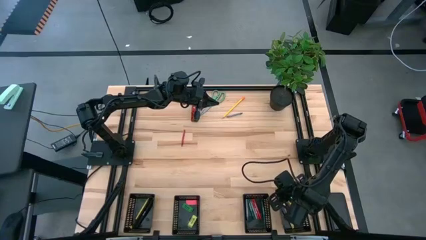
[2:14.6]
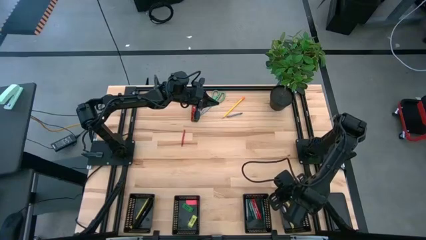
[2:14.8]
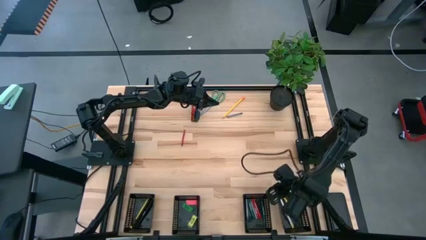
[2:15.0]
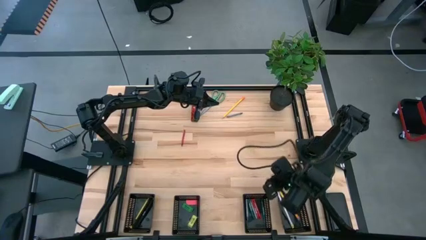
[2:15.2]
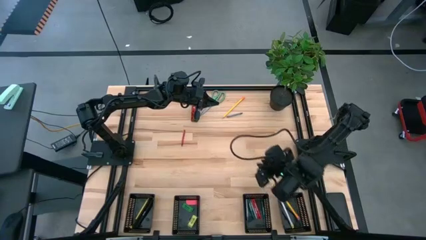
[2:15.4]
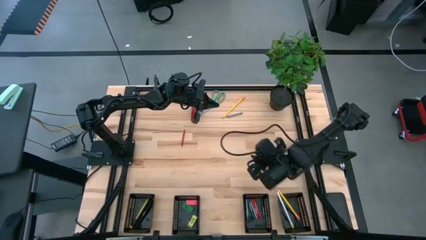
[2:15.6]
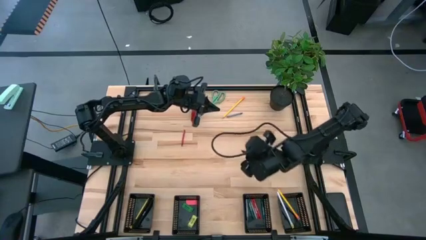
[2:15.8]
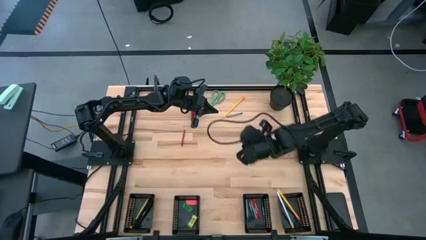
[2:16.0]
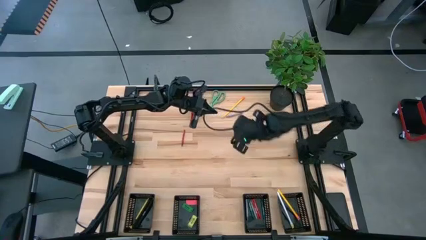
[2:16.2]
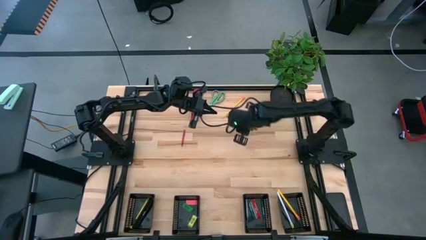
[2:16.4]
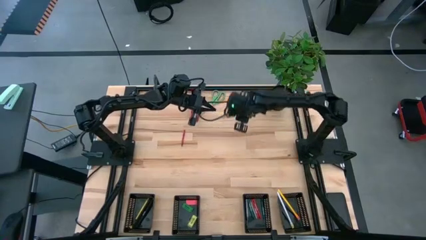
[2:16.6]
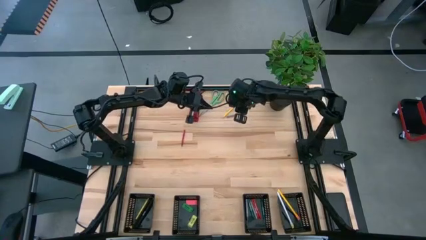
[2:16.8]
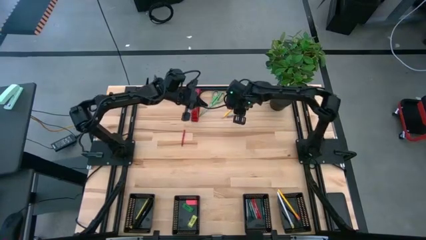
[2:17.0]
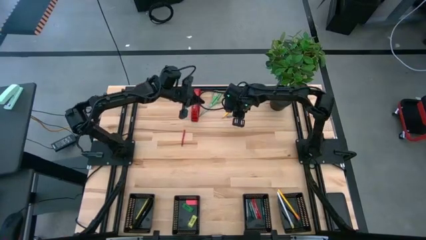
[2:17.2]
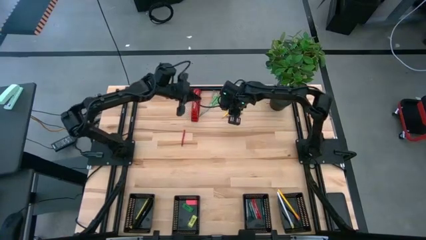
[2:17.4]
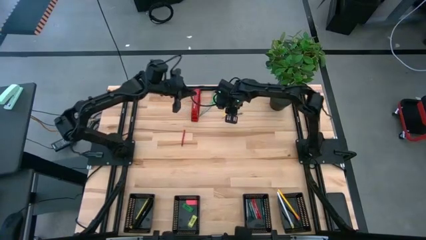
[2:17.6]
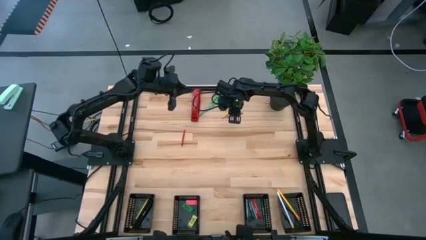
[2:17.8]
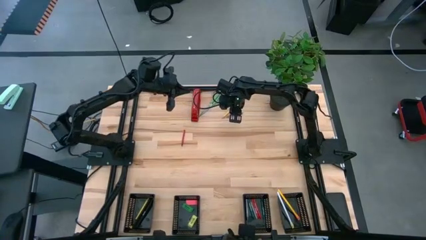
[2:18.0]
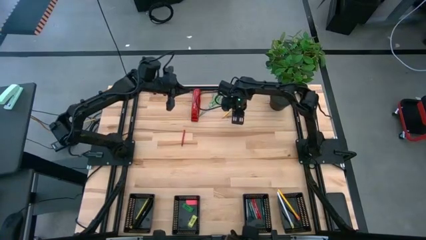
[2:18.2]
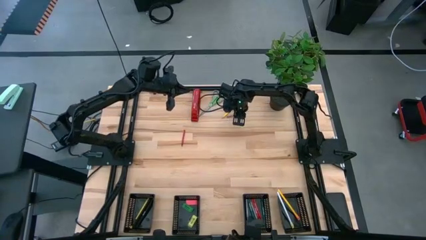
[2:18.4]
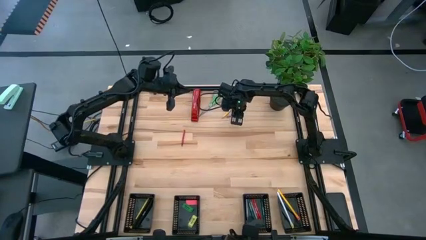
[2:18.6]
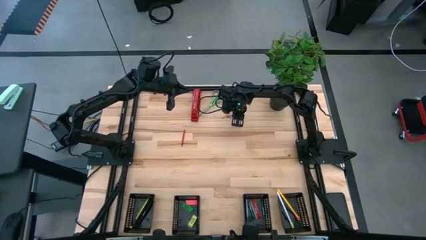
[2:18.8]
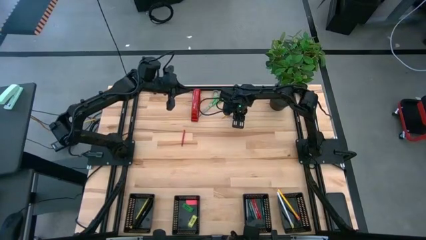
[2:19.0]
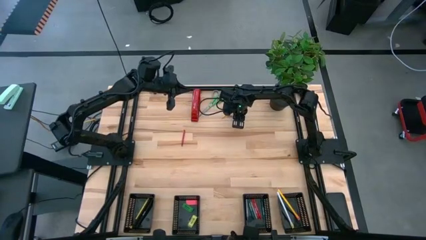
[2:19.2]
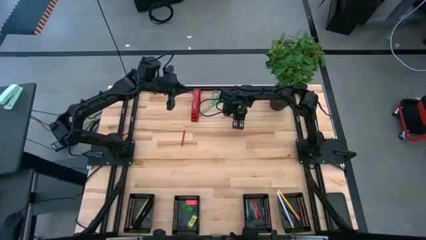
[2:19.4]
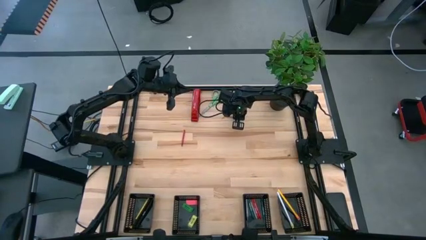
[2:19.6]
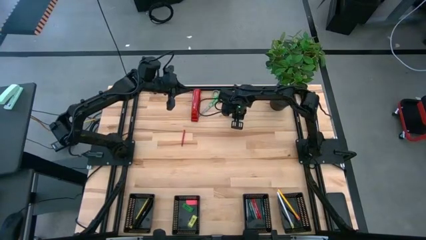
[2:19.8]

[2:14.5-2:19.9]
Task: Sort crayons/erasers/pens/pencils in bins
Put the gray crayon into the middle right black bin

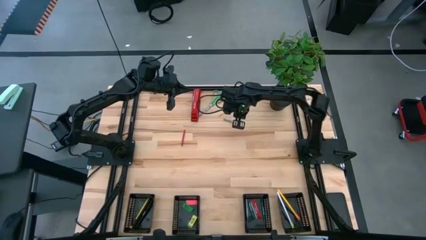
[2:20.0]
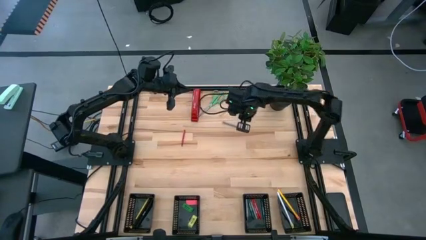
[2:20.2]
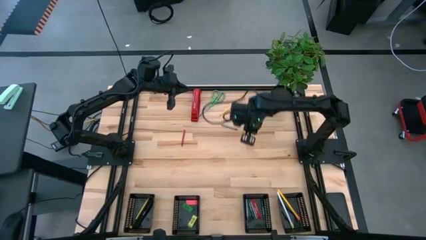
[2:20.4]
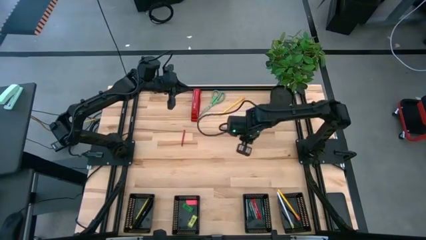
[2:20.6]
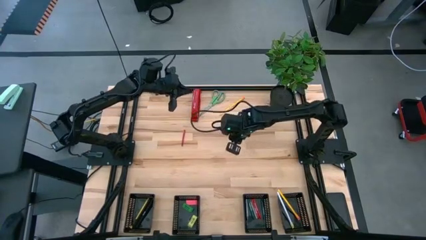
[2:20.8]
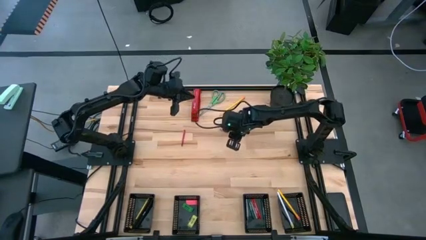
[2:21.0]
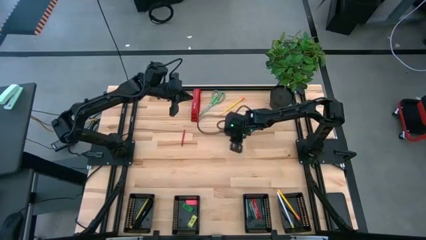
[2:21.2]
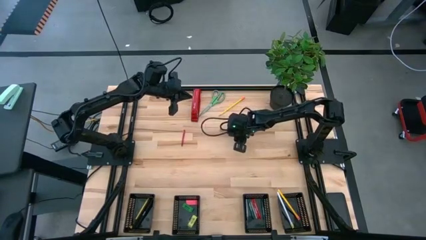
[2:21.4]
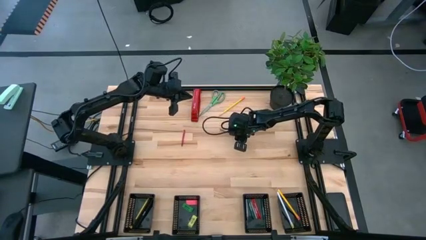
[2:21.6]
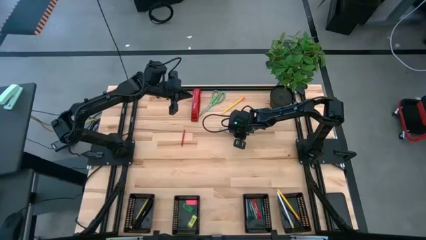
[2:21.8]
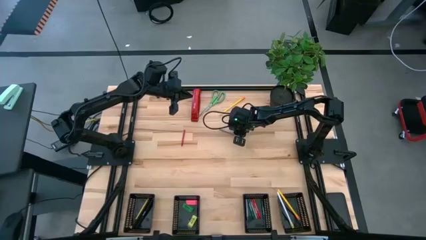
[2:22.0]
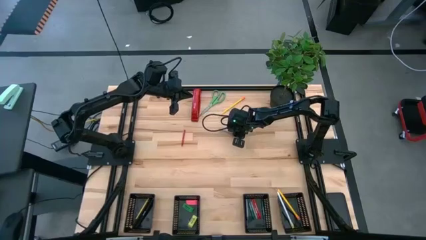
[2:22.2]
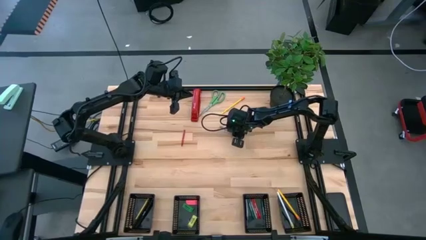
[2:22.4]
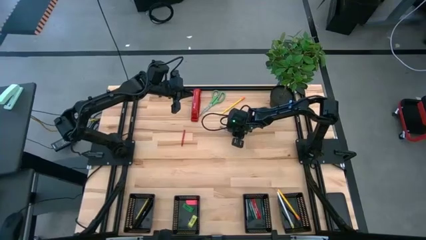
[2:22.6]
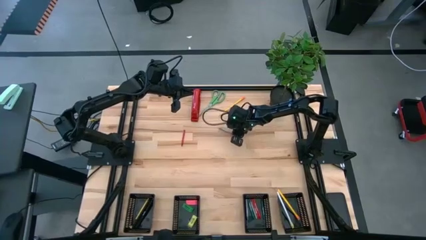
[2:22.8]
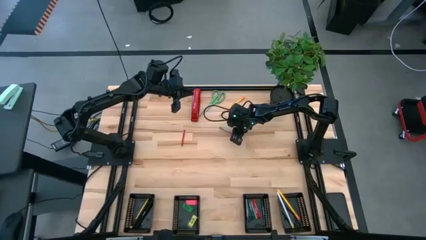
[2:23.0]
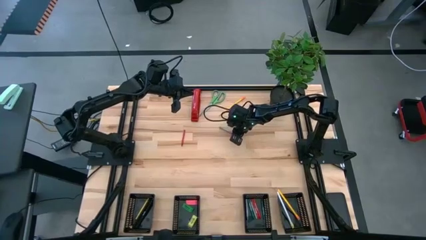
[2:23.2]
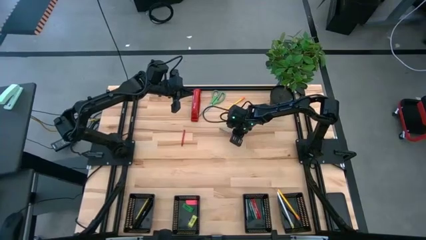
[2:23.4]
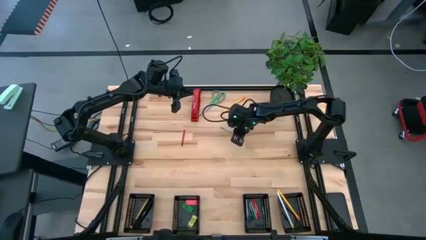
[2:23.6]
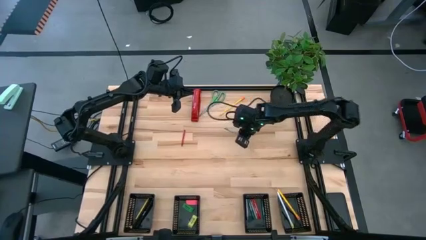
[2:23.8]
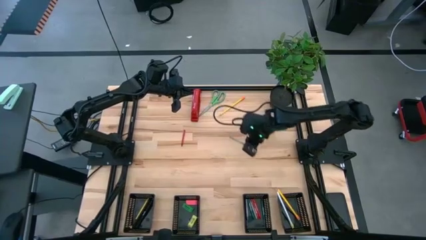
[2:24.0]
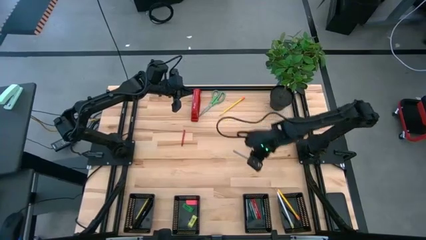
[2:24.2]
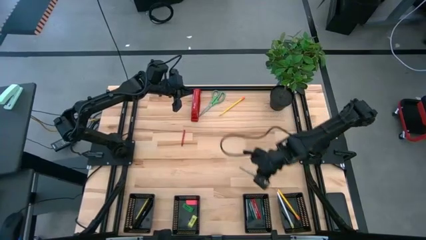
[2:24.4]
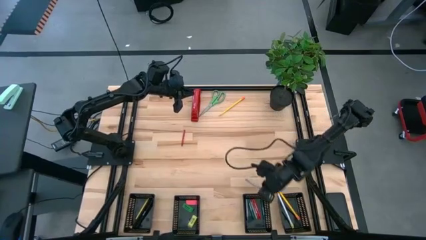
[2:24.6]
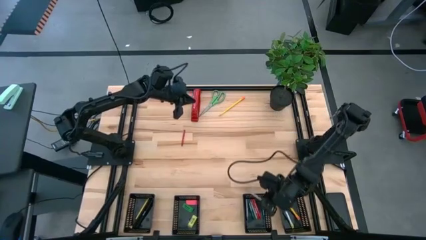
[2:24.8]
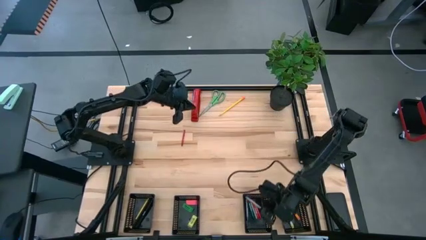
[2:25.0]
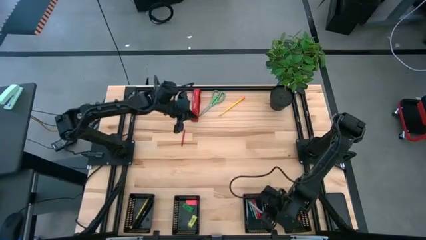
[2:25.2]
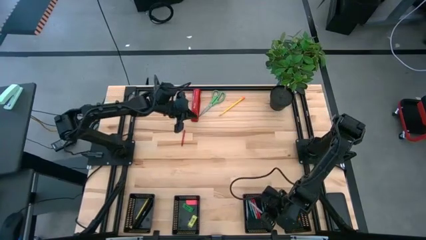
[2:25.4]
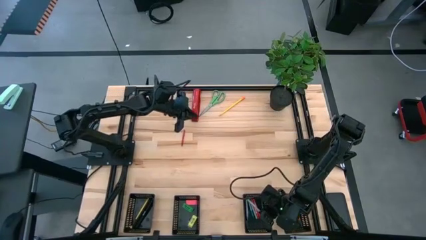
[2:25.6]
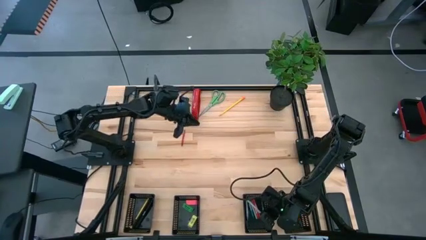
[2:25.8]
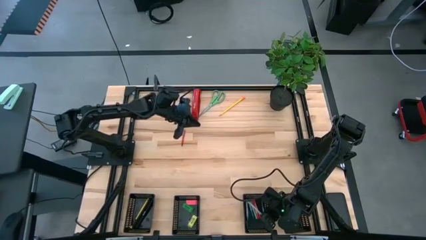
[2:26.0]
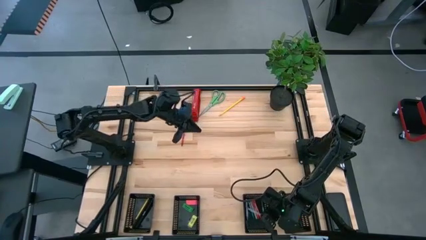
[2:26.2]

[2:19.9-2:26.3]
Put the gray crayon into the middle right black bin

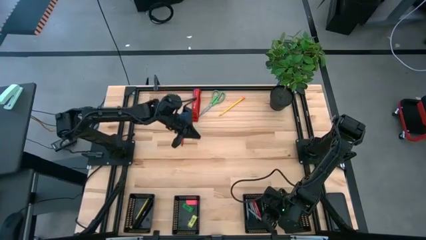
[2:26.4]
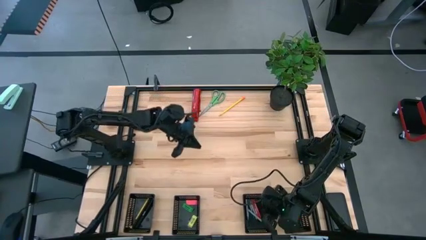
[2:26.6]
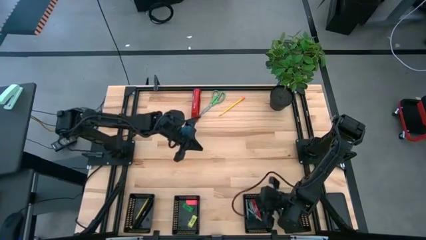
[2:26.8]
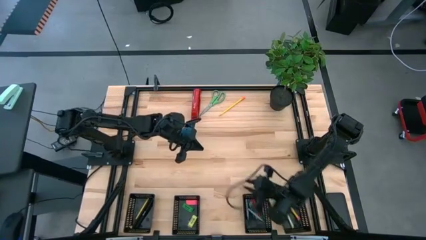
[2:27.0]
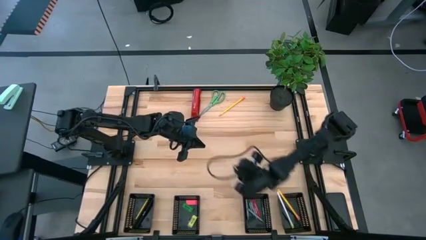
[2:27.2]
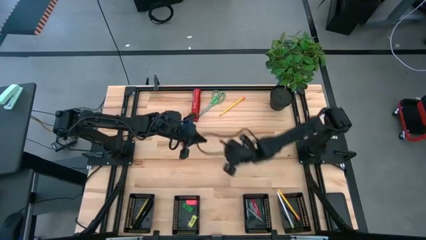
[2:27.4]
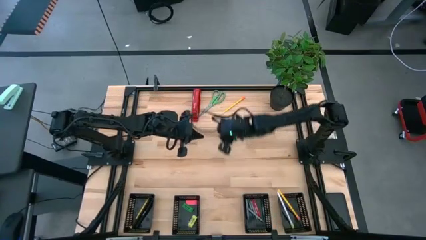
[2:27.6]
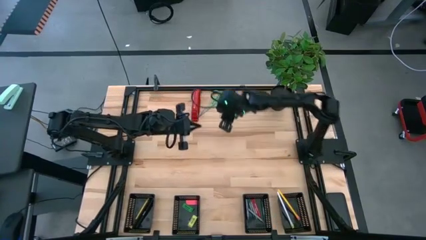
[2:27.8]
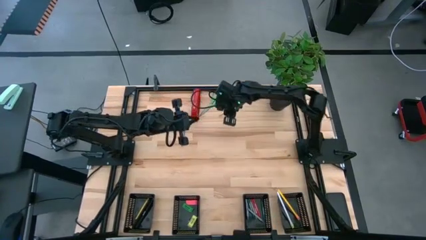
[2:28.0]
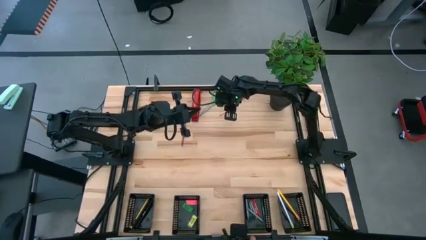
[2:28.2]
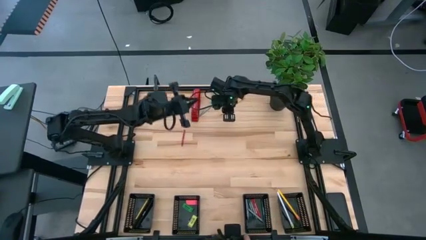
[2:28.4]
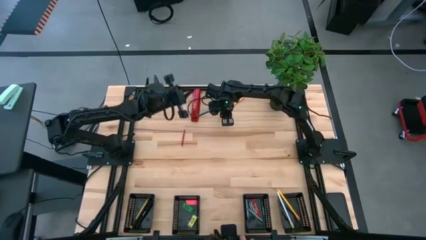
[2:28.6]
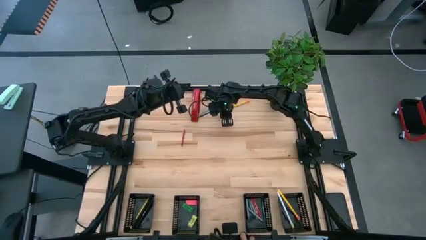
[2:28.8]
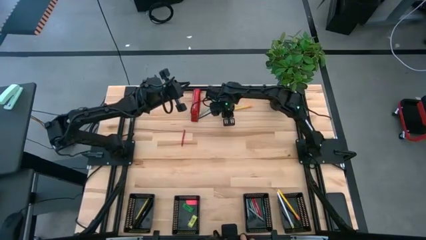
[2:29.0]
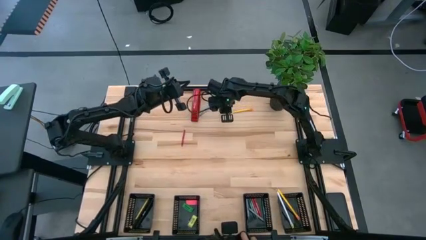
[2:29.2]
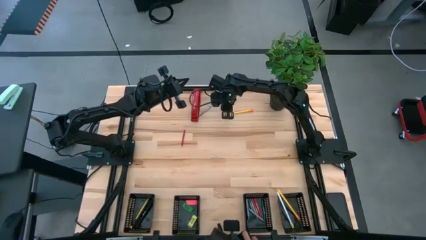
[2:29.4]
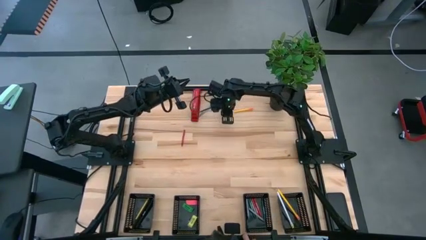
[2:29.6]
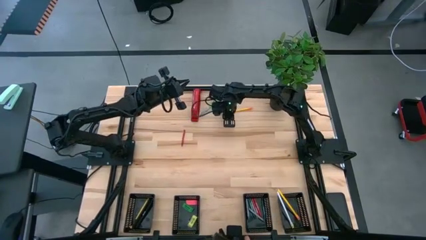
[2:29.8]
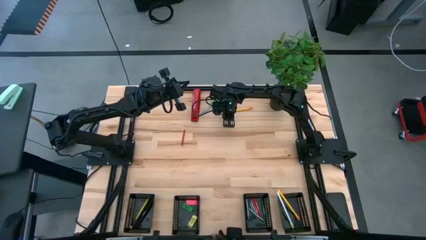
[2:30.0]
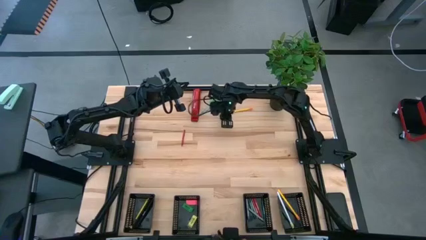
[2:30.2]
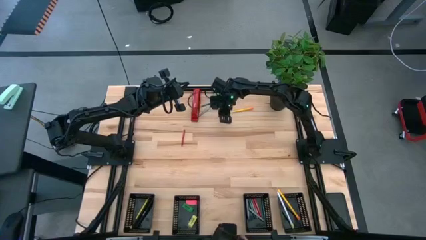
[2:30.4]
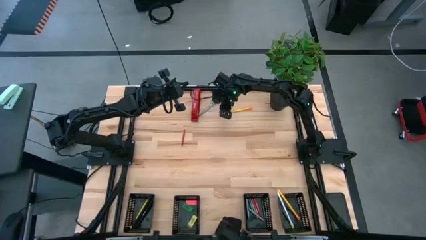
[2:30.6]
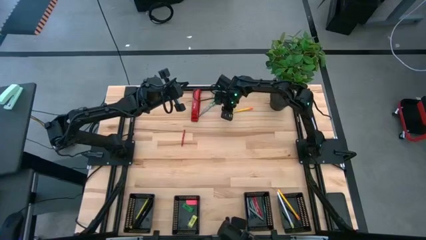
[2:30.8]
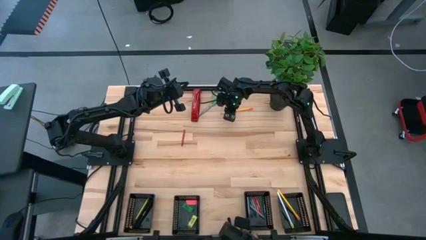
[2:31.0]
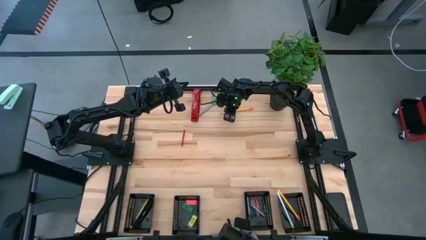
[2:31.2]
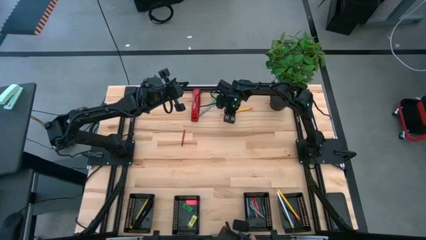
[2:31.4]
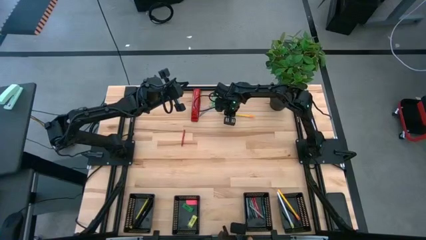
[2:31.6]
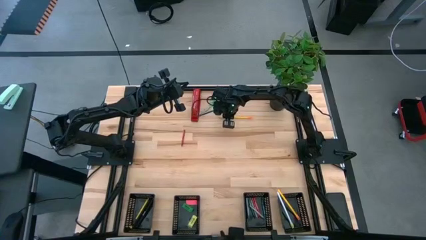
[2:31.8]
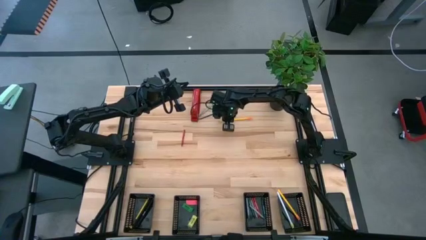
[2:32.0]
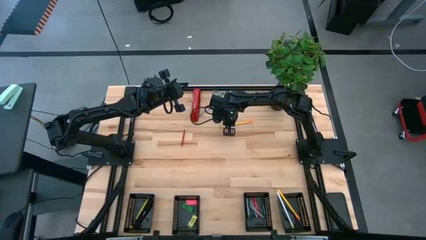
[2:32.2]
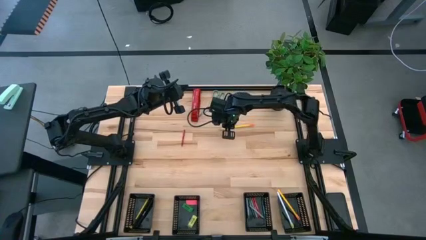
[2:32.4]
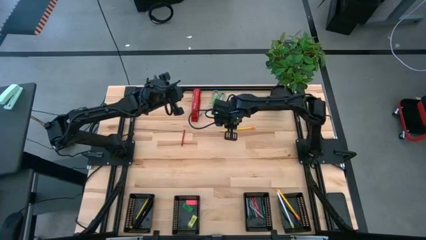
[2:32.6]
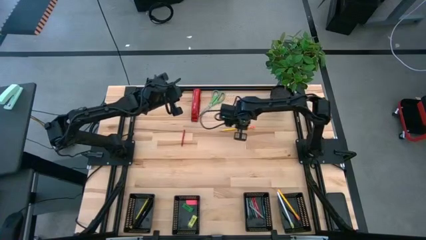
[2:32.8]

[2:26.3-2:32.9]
Put the yellow pencil into the right black bin
